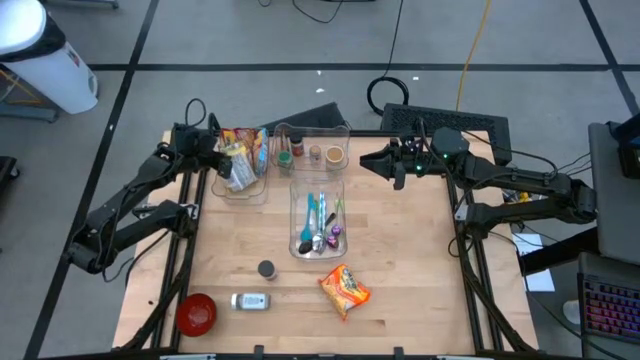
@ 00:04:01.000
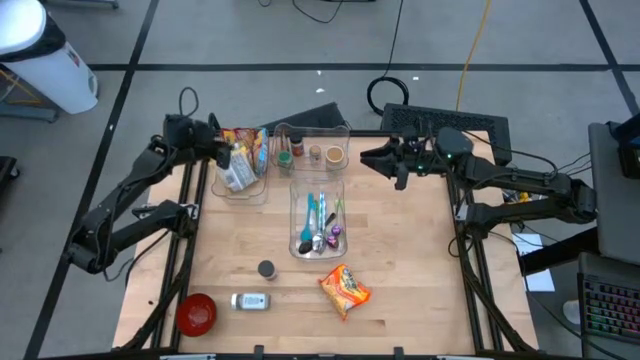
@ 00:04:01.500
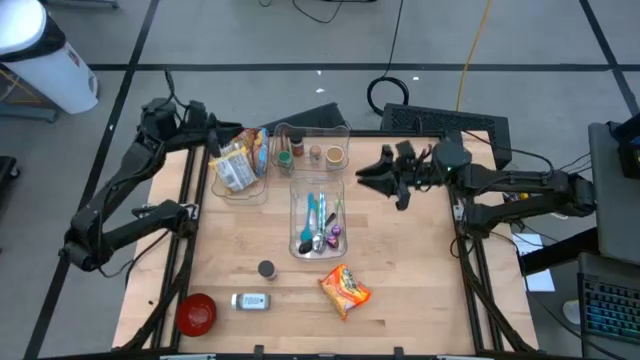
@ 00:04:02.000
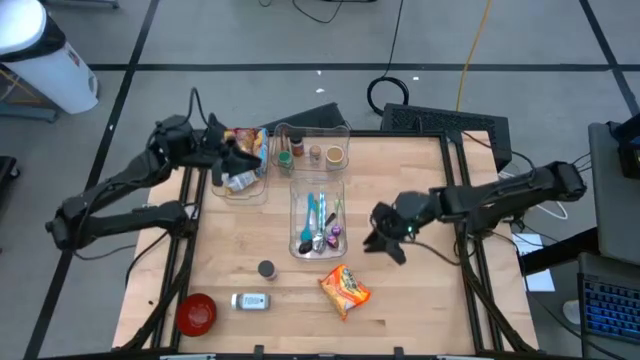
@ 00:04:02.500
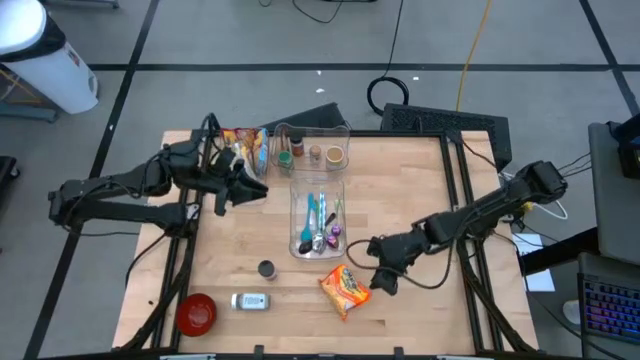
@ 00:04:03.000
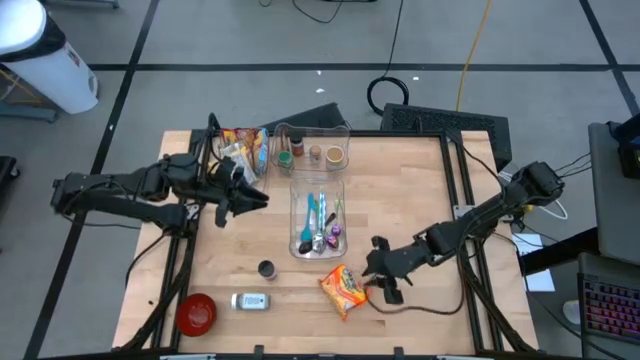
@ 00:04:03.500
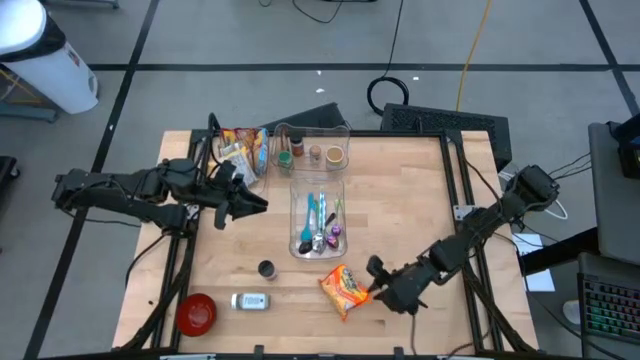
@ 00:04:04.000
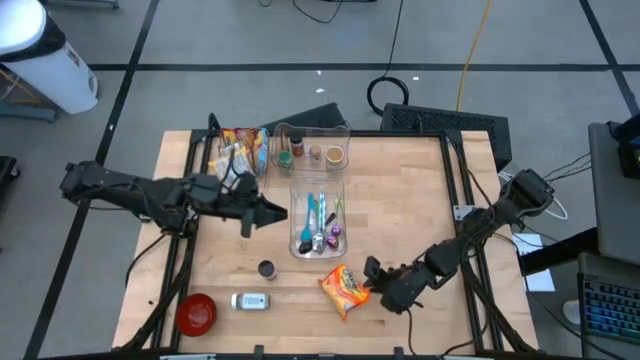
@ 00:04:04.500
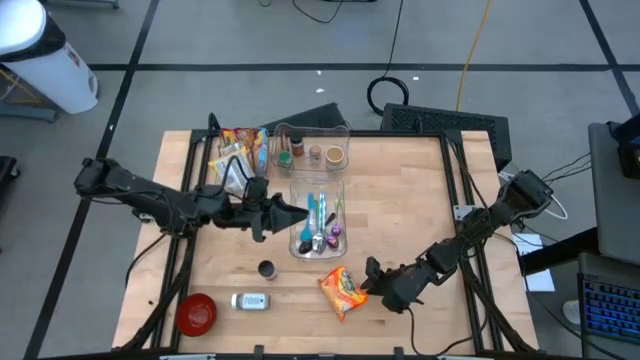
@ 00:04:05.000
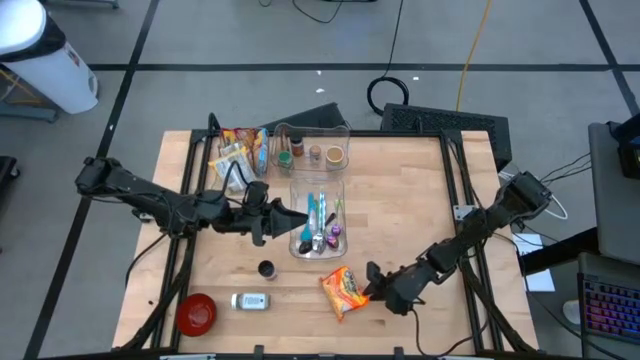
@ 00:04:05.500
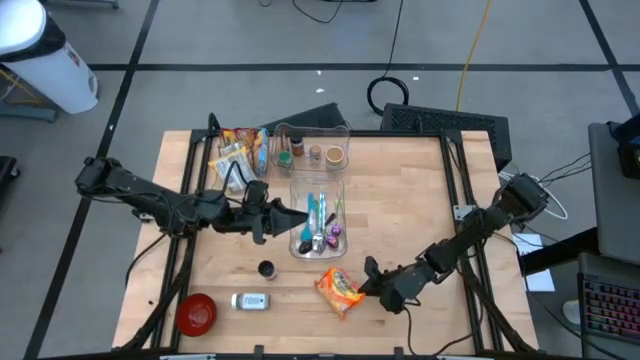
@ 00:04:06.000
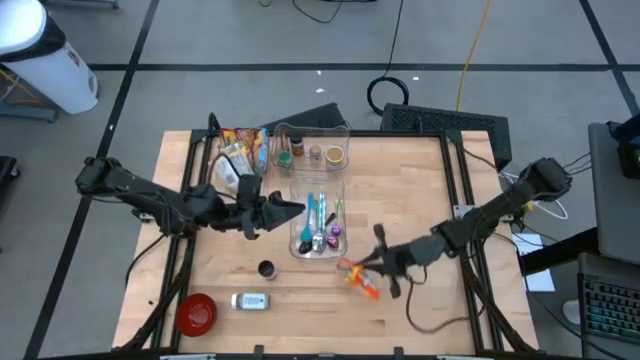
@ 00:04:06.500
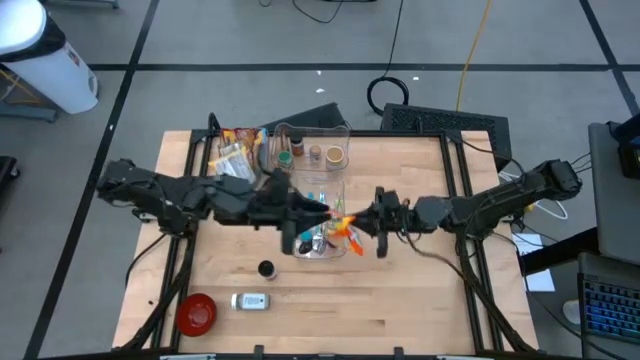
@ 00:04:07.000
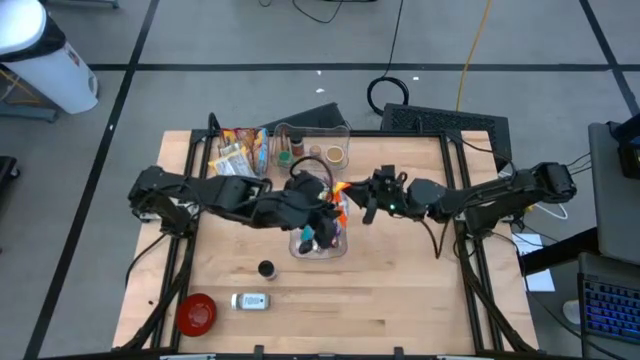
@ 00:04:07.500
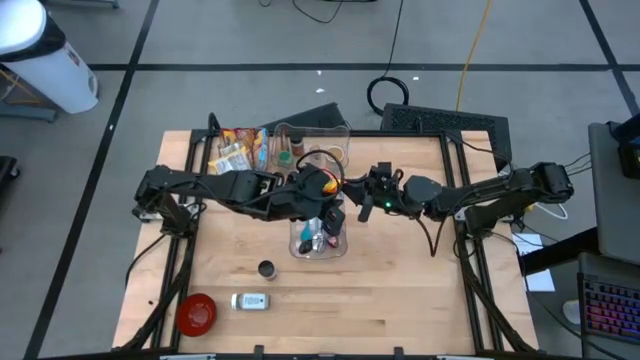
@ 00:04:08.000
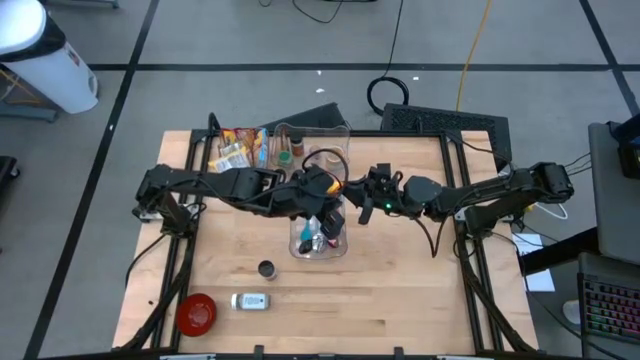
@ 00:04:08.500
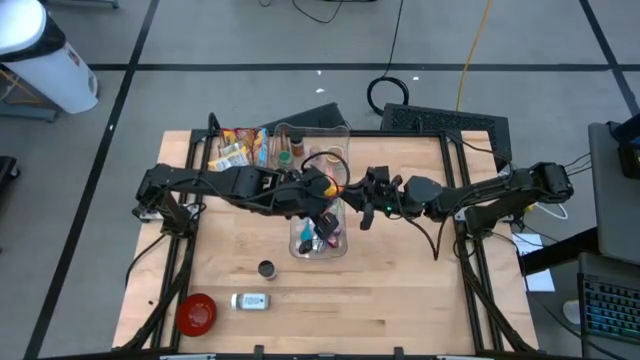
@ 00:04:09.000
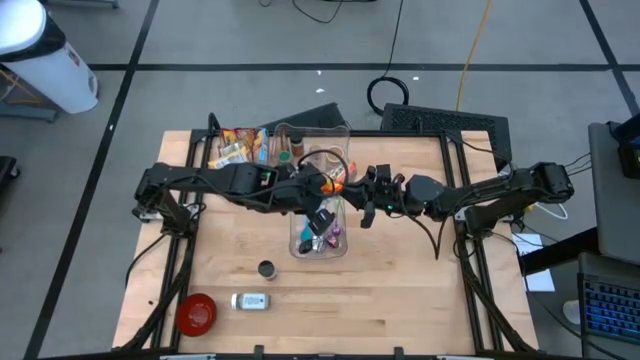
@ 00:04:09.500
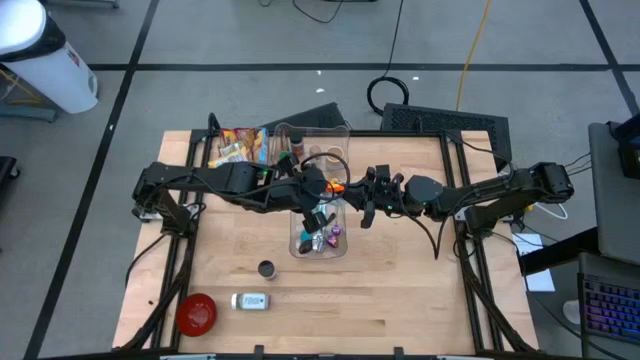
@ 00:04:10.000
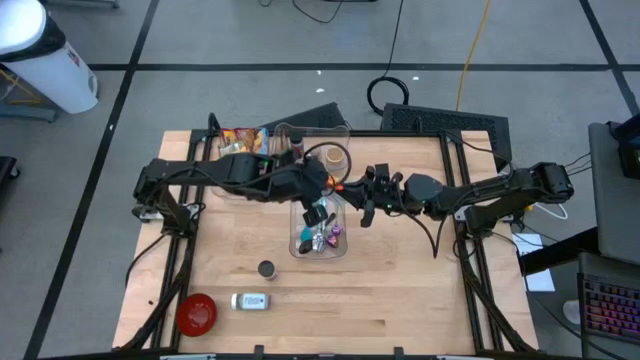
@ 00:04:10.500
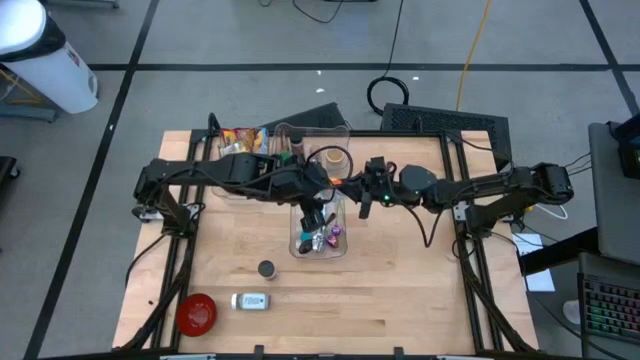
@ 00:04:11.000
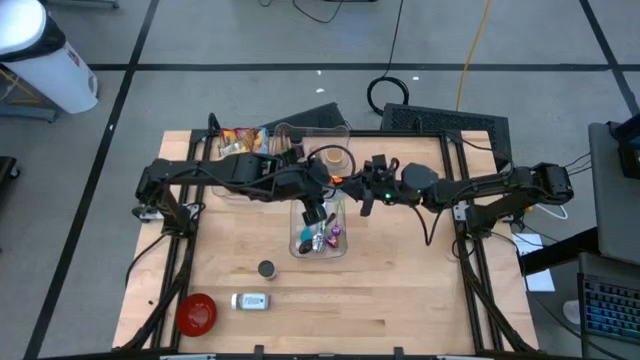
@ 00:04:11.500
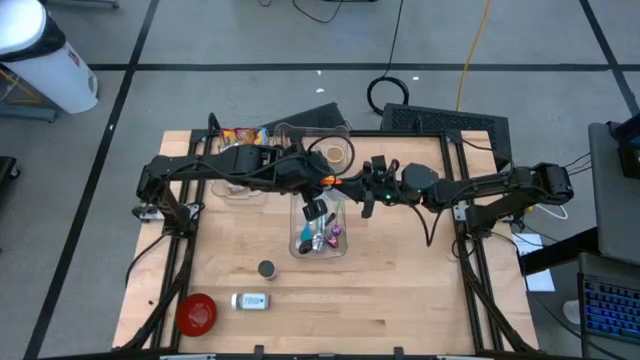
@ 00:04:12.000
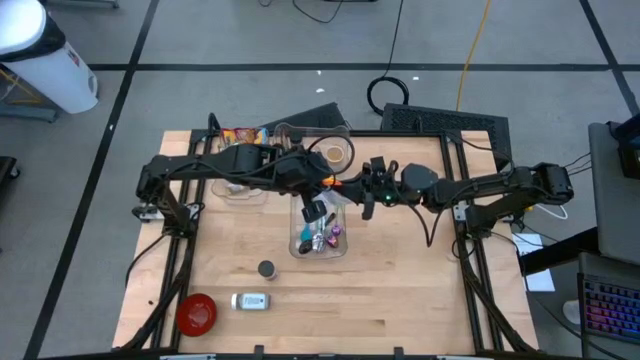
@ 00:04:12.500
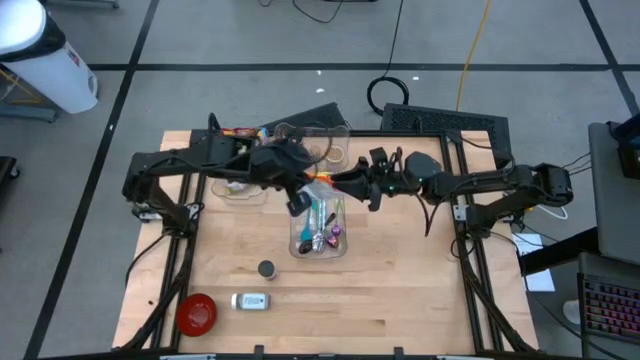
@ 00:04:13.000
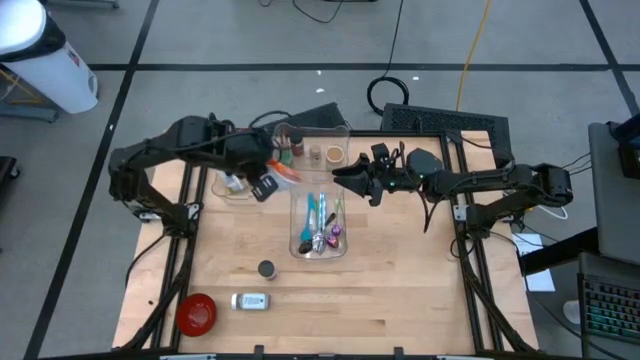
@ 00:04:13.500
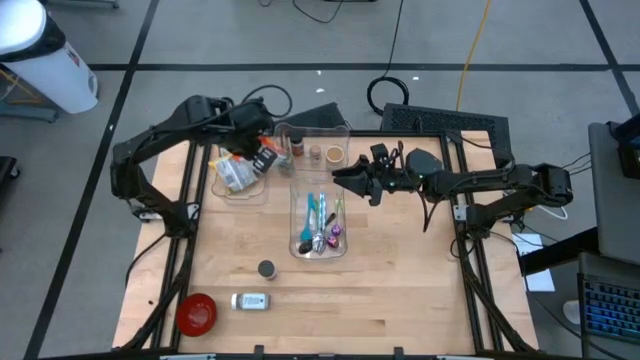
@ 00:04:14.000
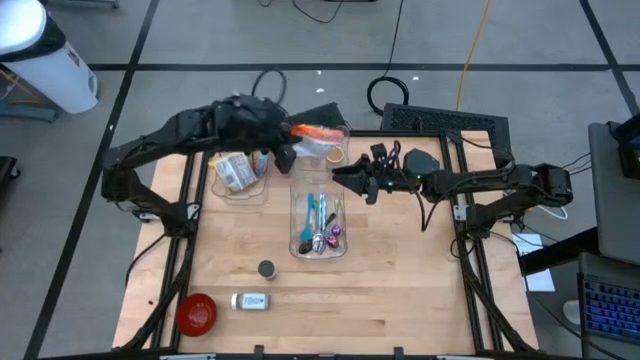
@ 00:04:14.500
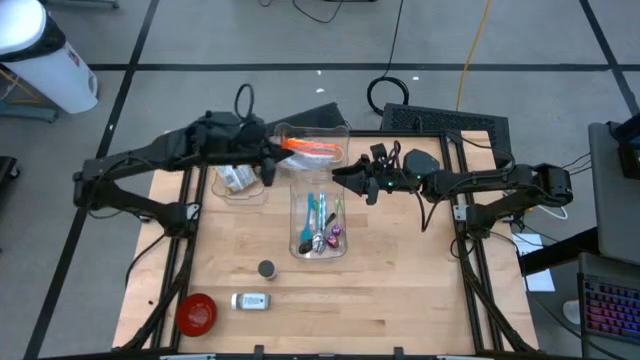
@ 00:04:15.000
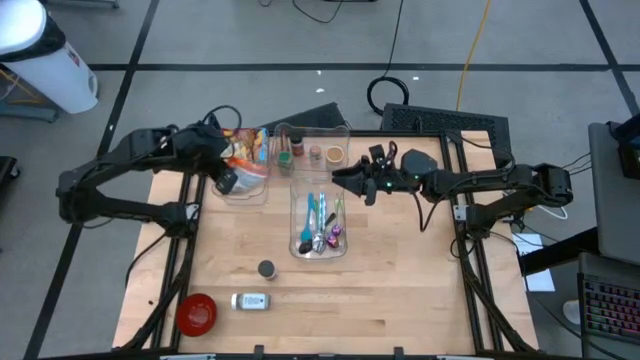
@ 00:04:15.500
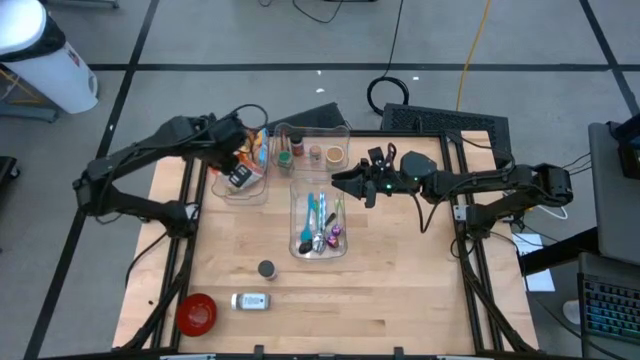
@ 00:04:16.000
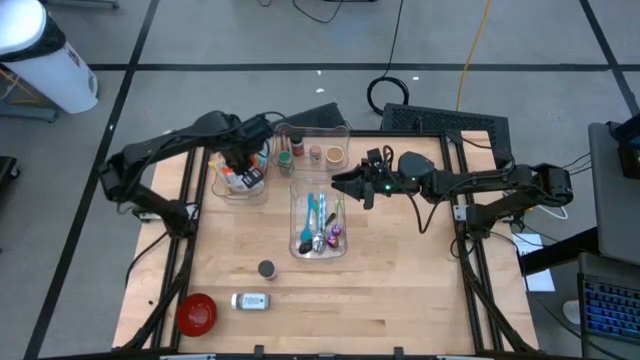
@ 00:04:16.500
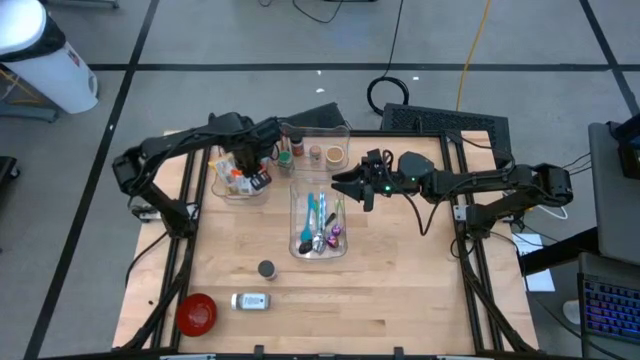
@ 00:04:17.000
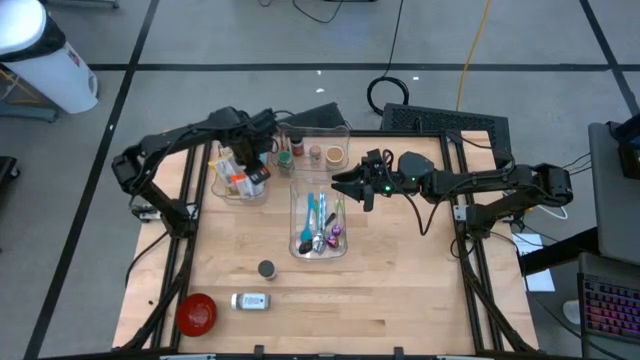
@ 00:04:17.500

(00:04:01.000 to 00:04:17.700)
Task: Pick & Place Food Item
Put the orange noodle pack into the top left transparent bin
